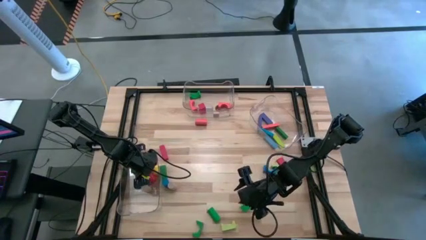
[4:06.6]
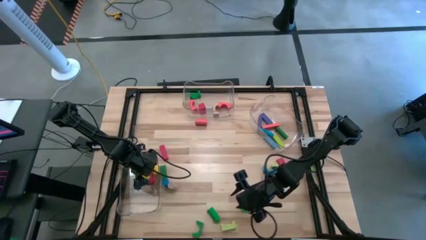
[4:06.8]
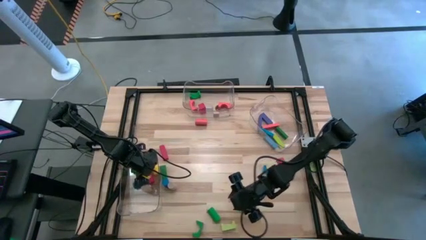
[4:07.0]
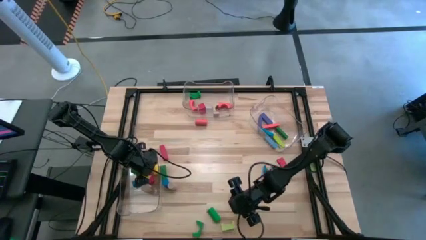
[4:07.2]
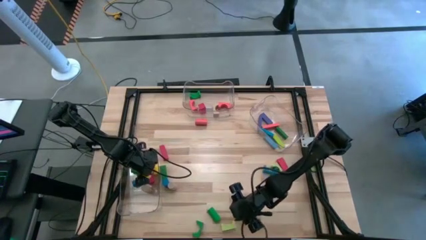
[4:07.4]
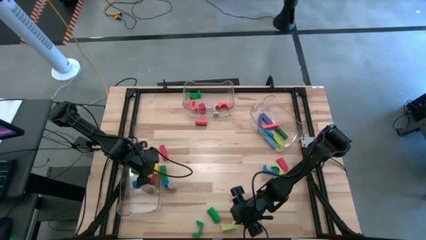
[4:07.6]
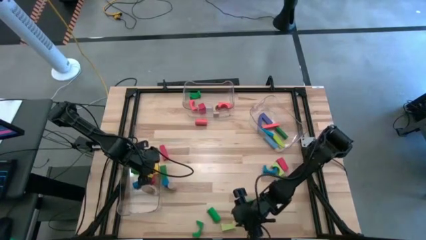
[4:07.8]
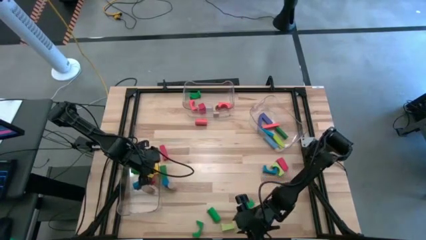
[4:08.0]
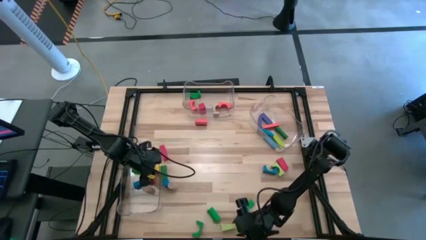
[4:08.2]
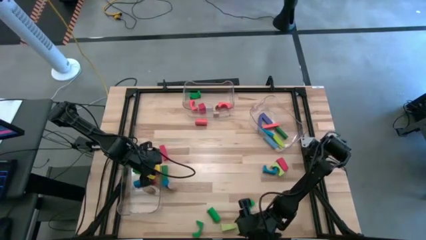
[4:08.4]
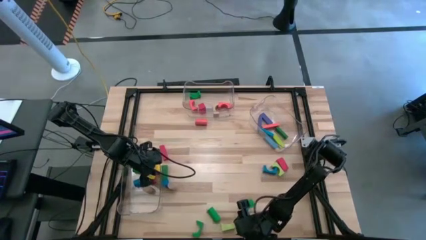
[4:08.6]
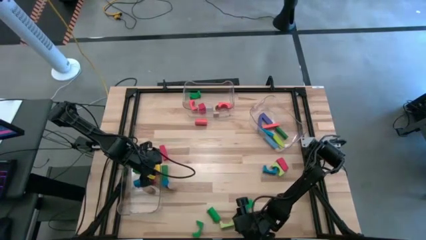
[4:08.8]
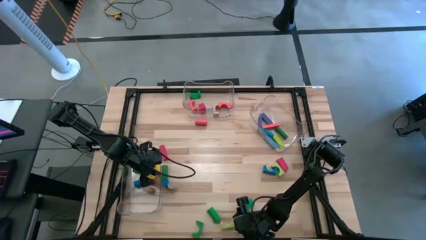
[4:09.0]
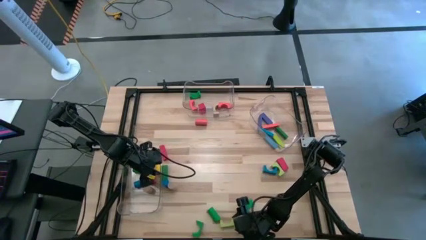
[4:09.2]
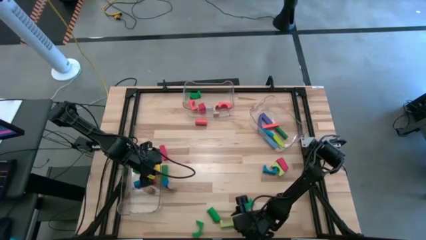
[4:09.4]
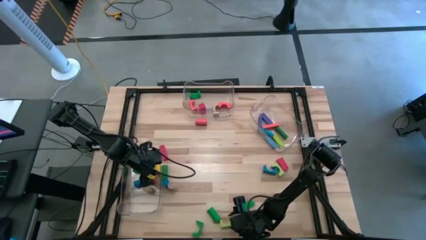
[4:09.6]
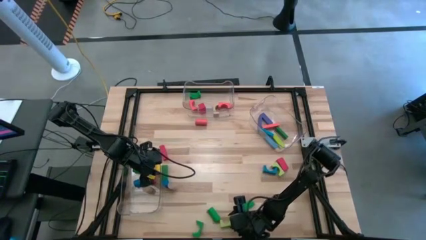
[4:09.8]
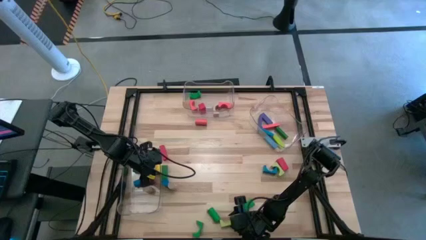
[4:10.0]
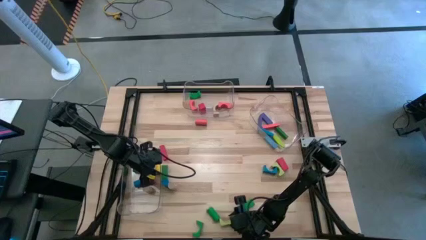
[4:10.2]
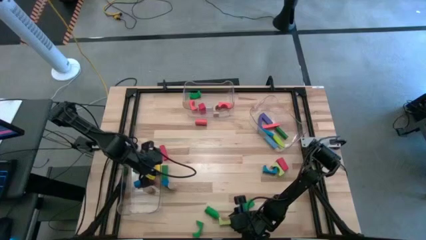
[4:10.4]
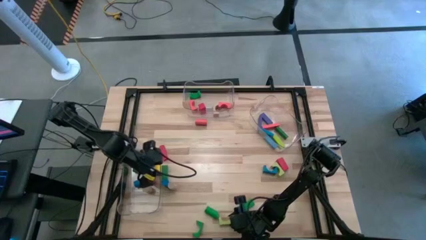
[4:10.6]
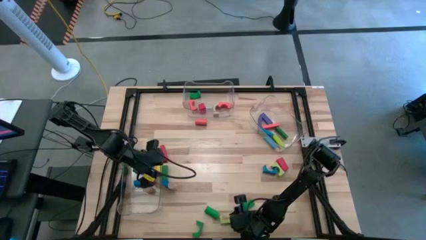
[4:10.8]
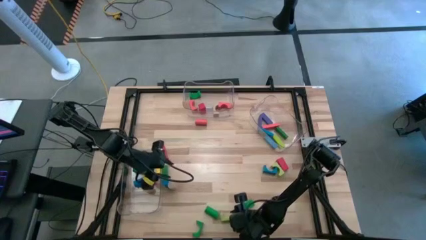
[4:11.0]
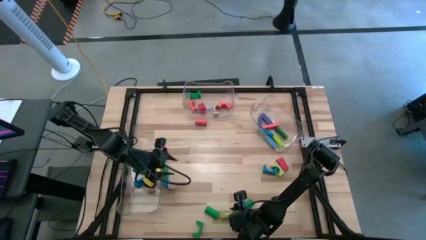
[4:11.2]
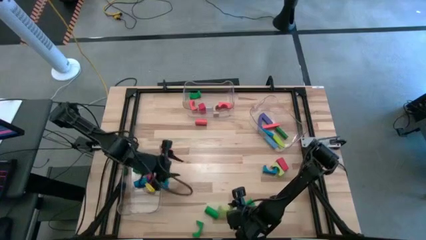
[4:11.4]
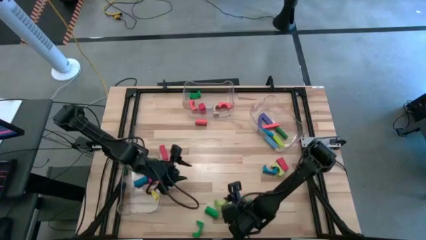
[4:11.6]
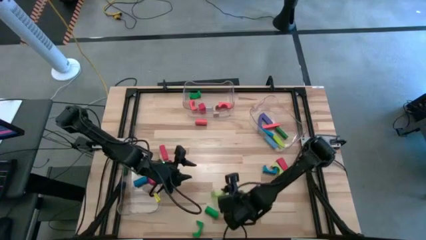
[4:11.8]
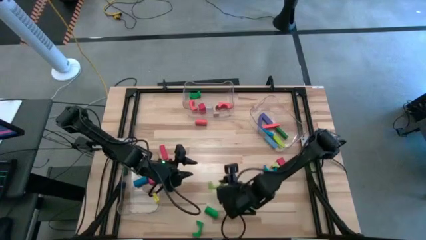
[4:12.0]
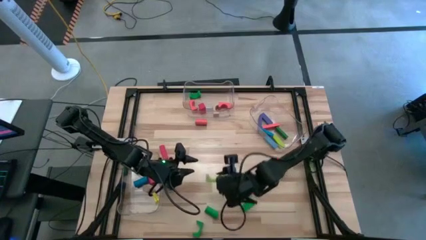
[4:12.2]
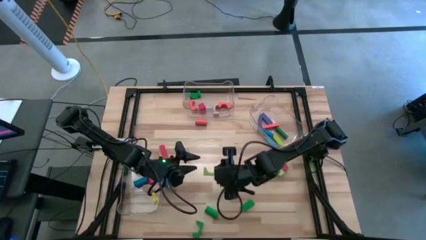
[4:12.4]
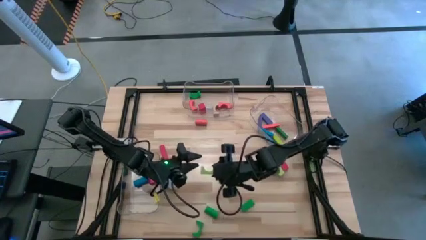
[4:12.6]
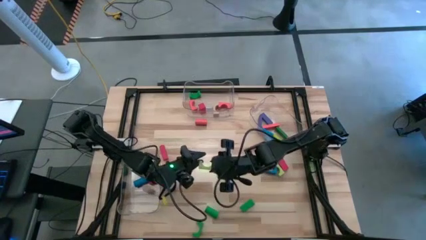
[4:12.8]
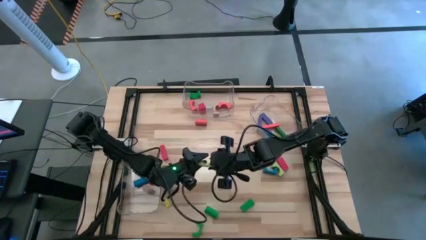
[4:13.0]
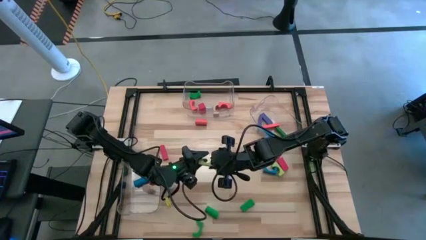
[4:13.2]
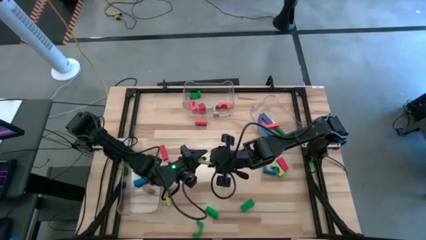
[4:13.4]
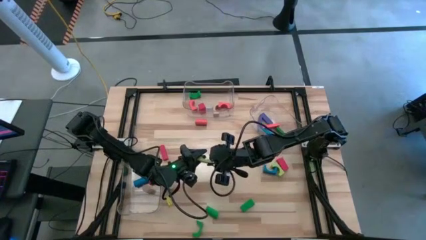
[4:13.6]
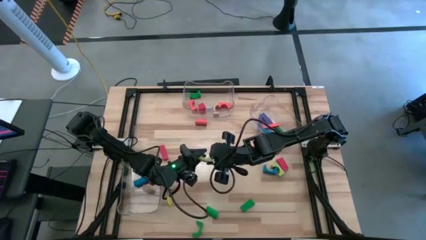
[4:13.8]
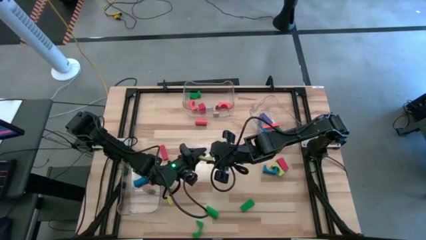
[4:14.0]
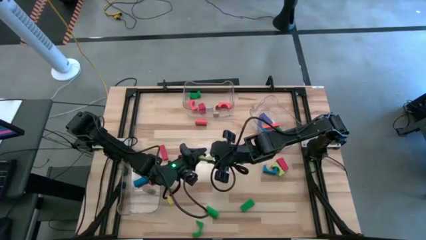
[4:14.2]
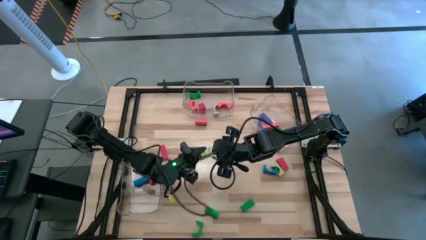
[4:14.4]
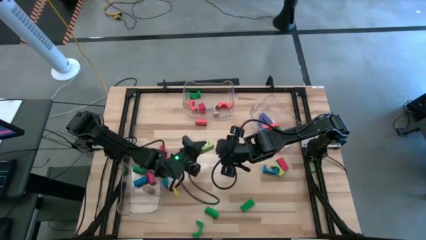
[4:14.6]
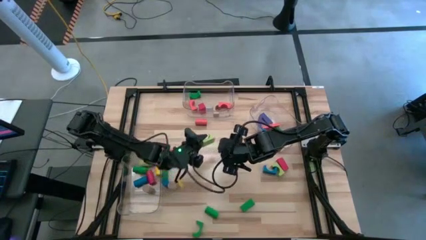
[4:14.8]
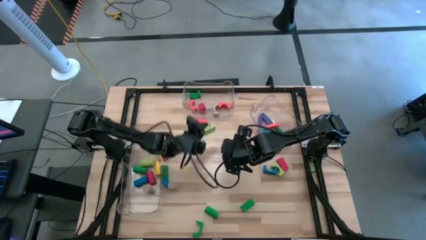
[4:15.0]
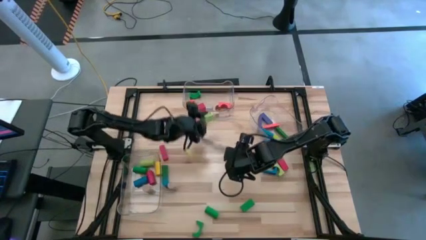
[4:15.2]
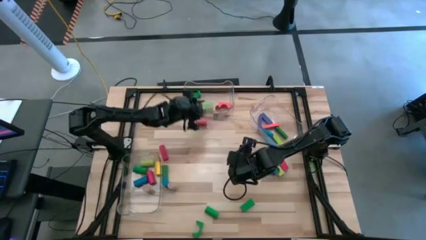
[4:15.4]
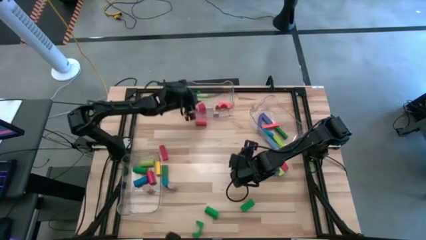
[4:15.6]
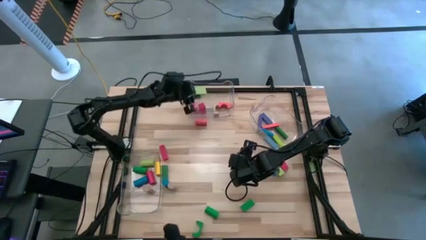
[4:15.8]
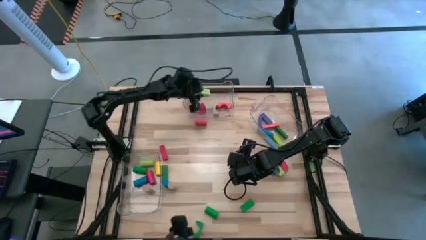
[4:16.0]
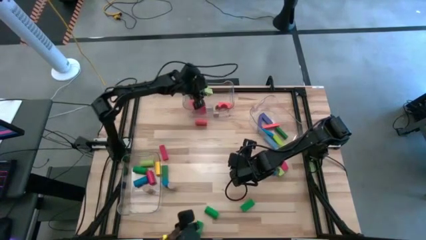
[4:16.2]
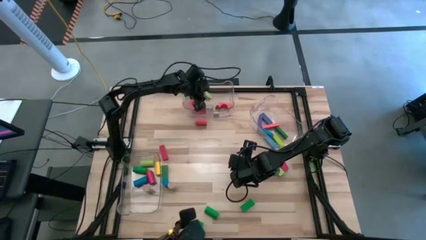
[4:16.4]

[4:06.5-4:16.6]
Task: Sort blocks by size
Put the light green arch block into the middle transparent bin
